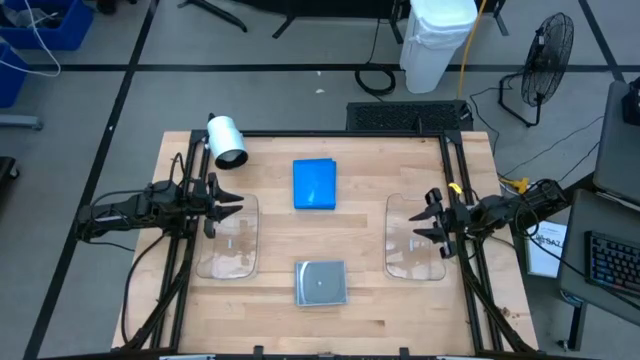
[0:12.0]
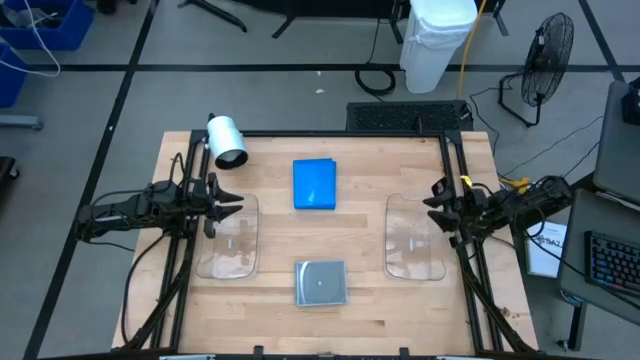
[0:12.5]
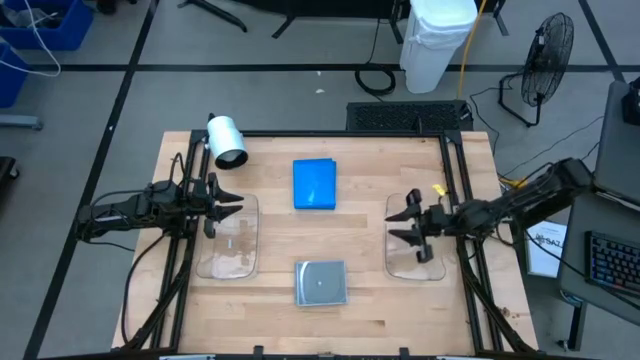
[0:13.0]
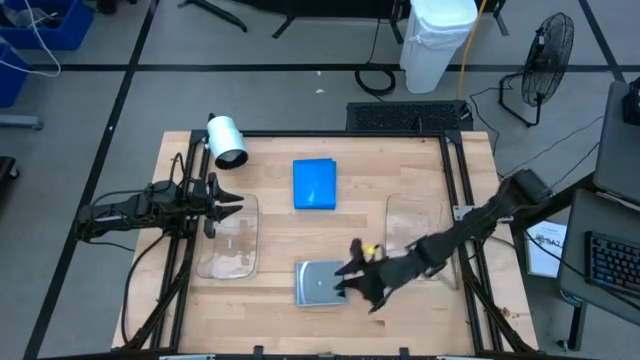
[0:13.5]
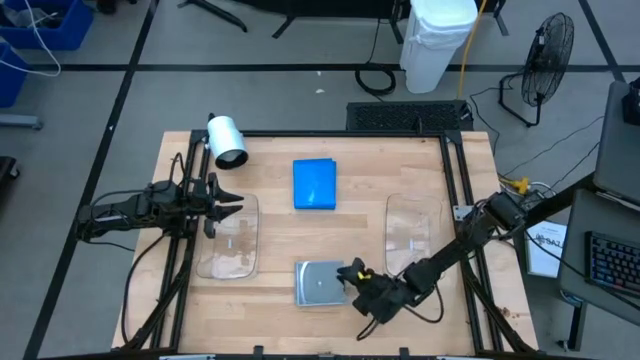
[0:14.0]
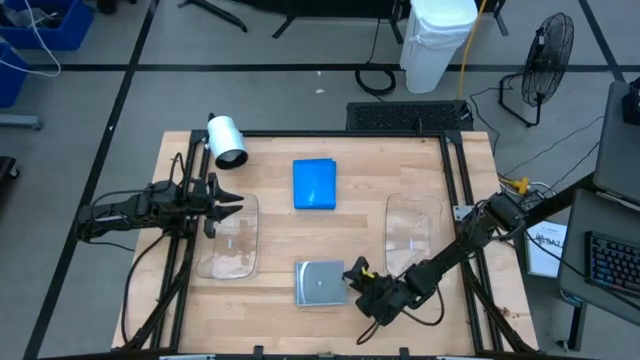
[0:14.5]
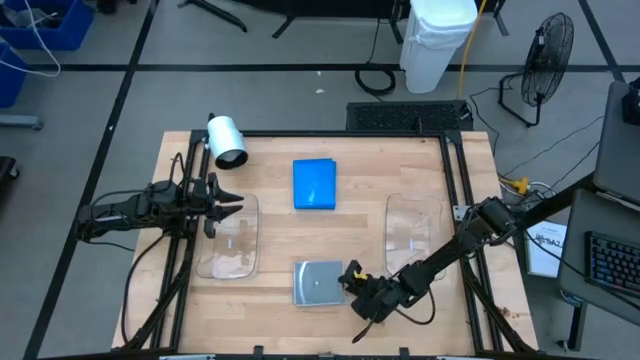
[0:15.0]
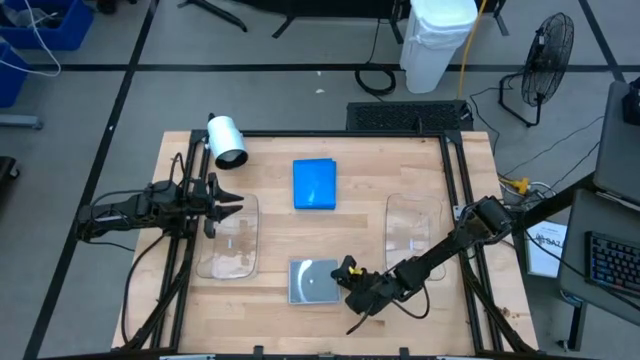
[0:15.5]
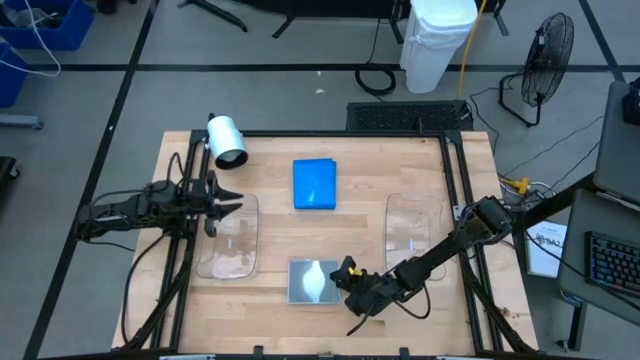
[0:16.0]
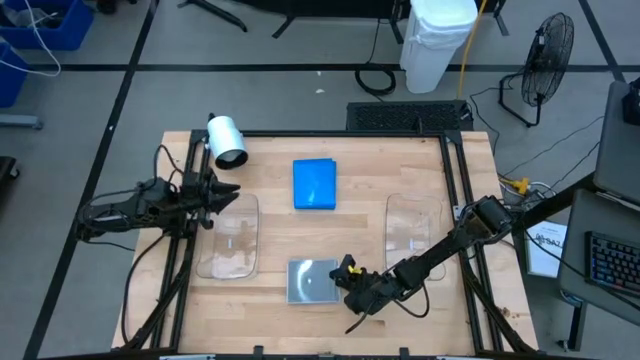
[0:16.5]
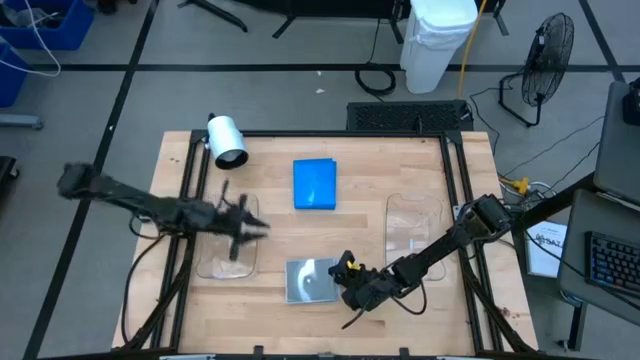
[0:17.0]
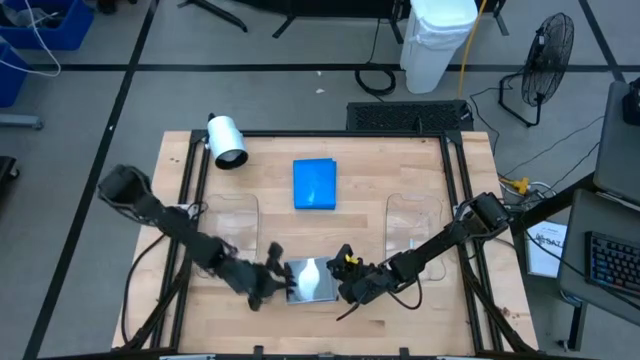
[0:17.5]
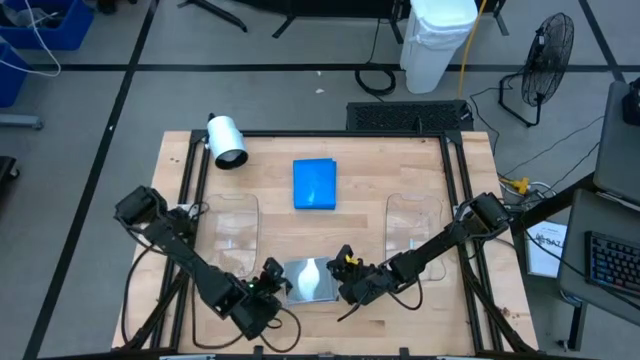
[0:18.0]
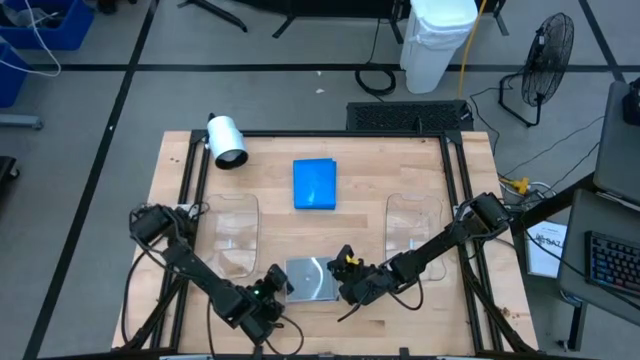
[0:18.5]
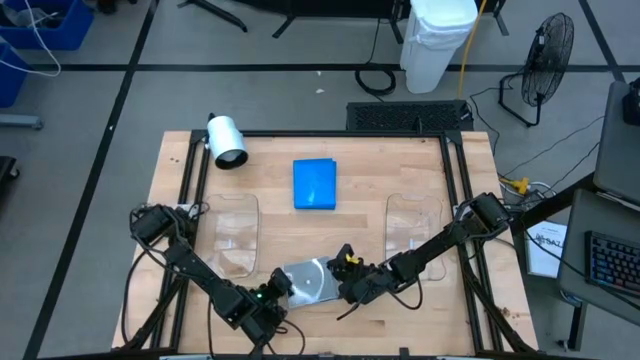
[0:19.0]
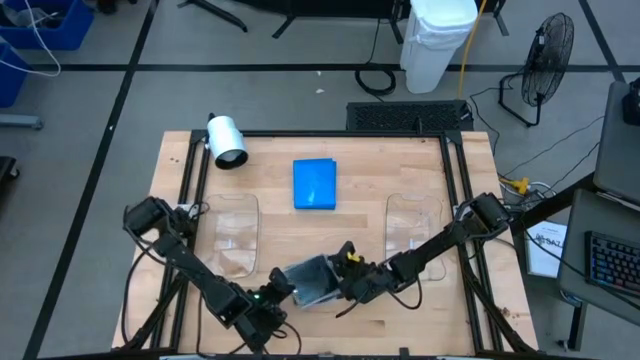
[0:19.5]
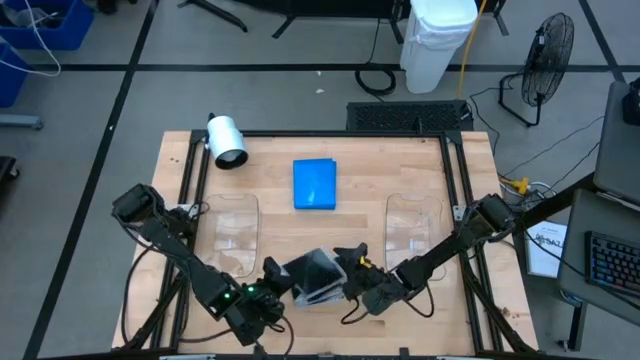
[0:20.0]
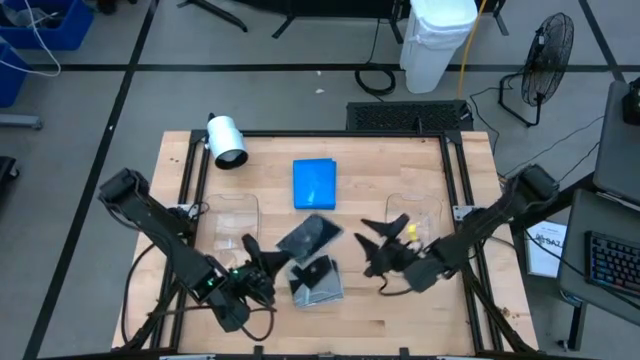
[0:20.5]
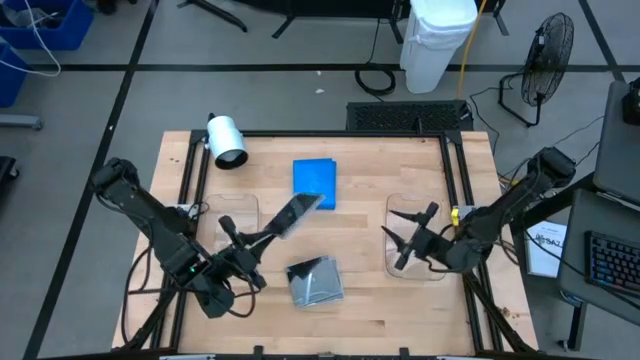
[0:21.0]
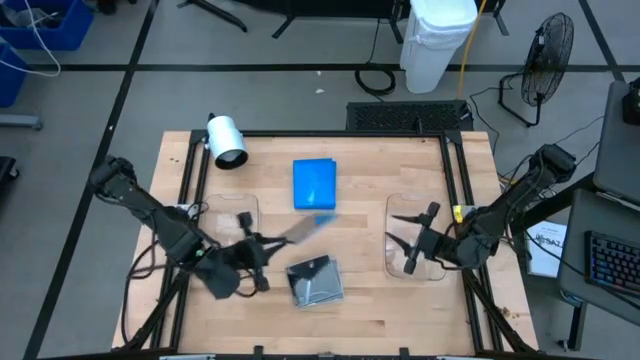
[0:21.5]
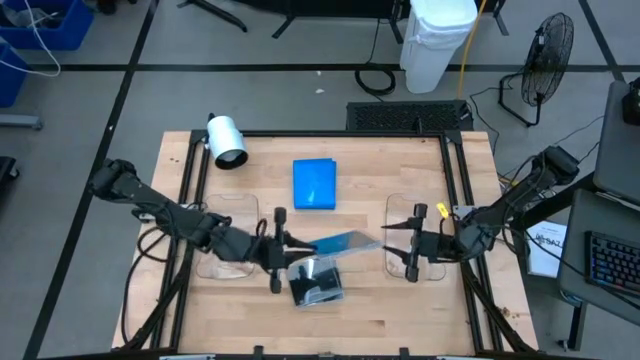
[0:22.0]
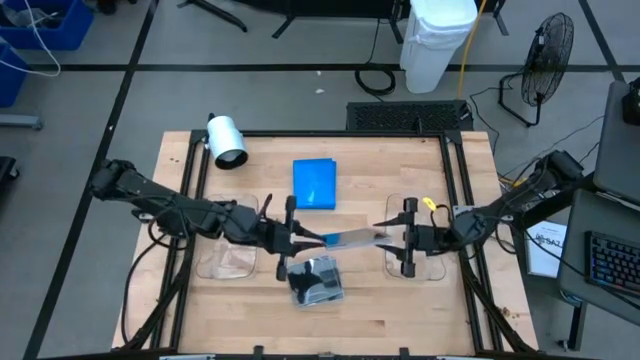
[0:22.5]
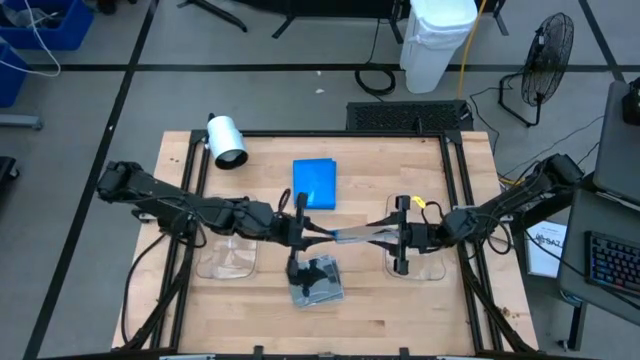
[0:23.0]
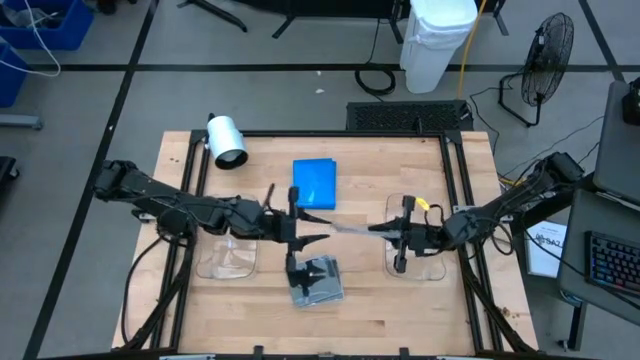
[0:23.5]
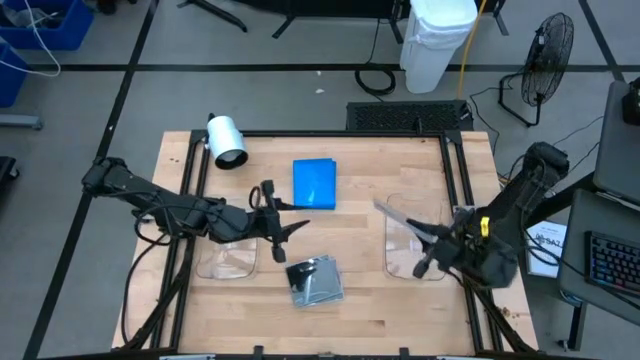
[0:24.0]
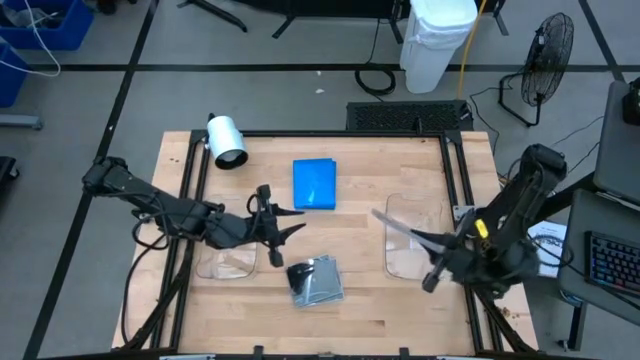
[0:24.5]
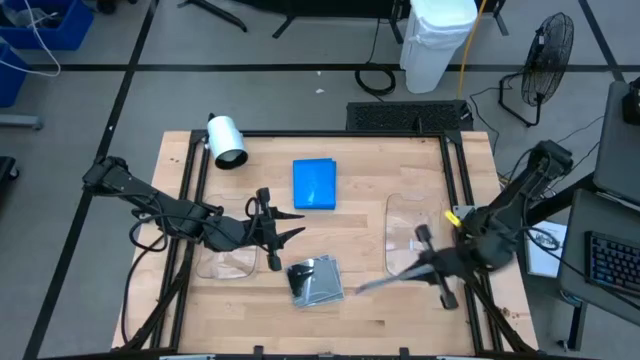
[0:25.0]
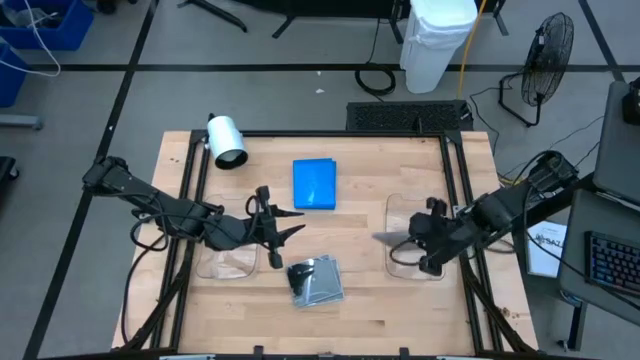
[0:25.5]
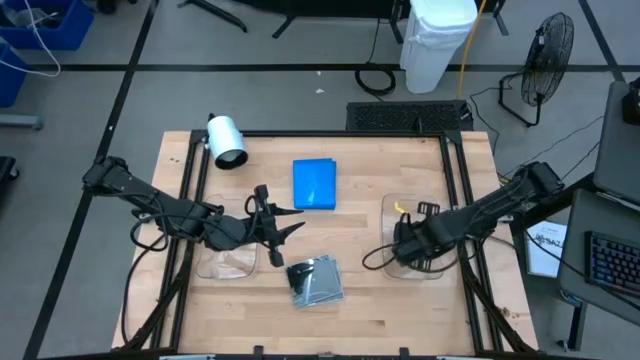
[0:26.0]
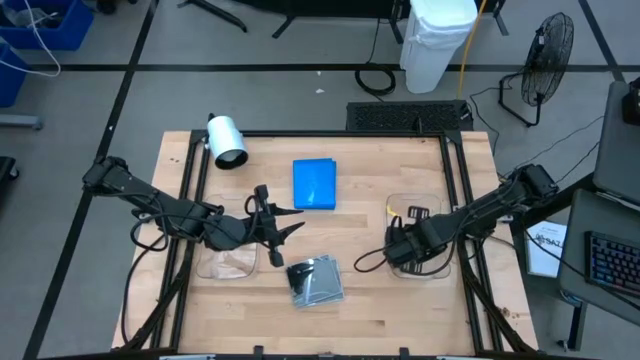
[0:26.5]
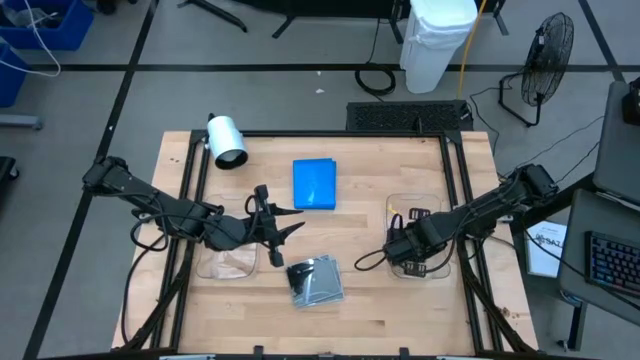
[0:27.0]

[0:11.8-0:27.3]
Task: Pick & place jewel cases by type
Put the black CD case into the right transparent bin

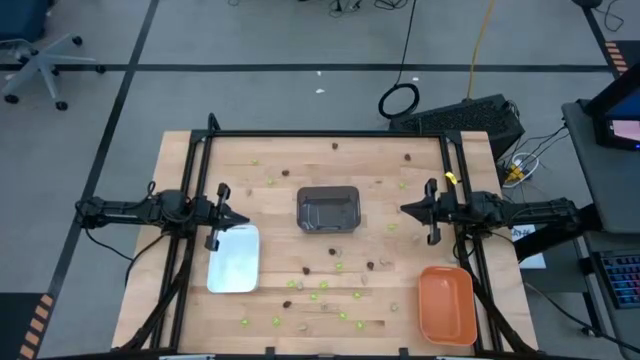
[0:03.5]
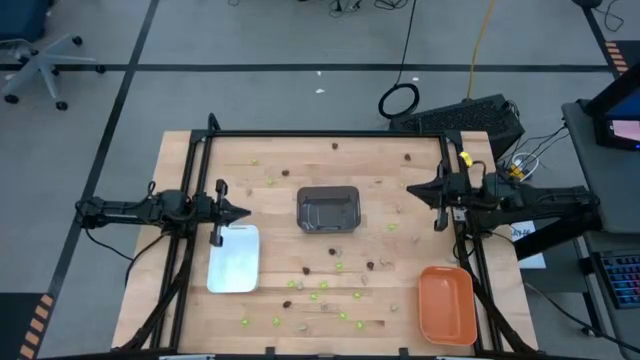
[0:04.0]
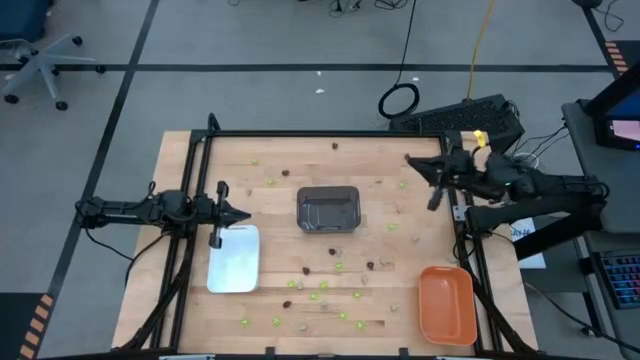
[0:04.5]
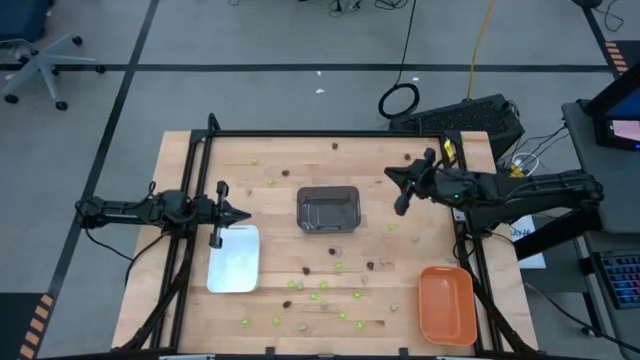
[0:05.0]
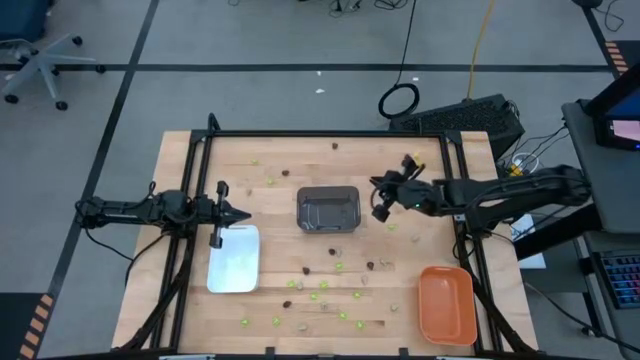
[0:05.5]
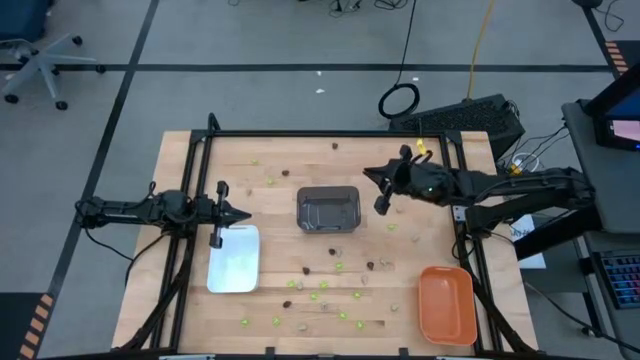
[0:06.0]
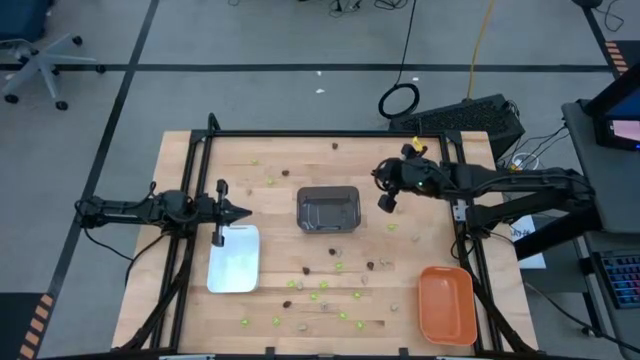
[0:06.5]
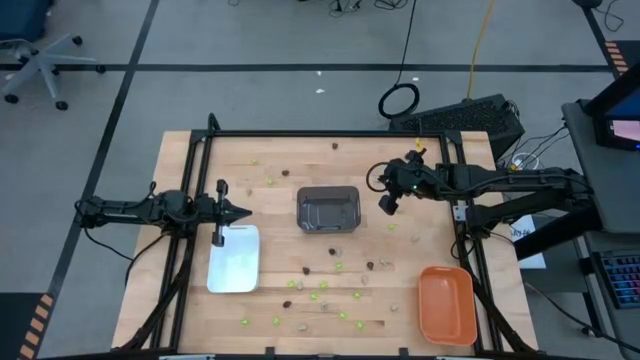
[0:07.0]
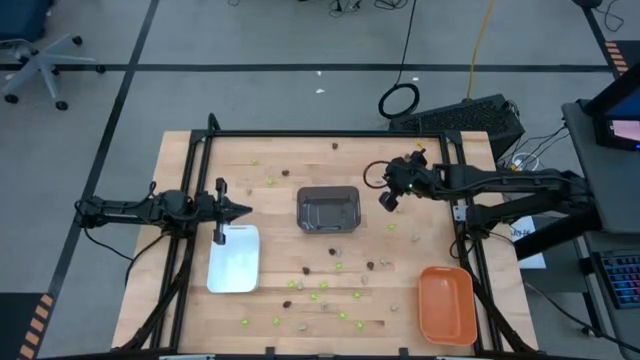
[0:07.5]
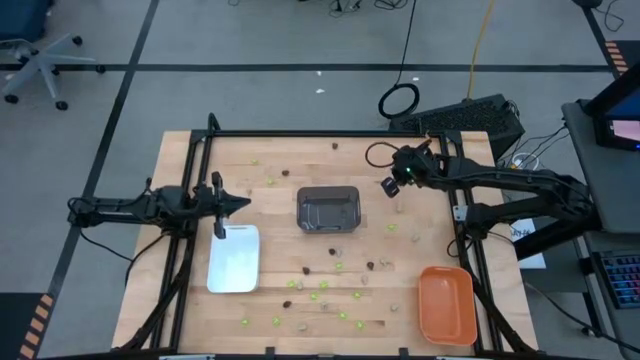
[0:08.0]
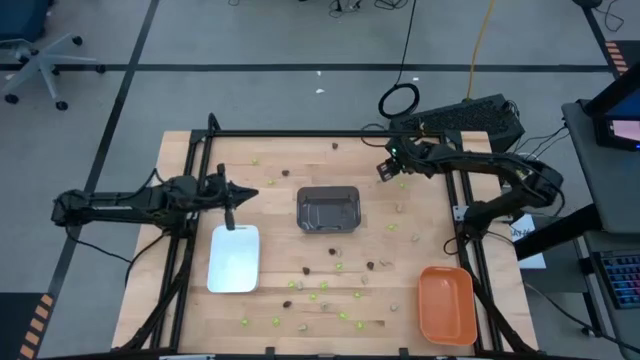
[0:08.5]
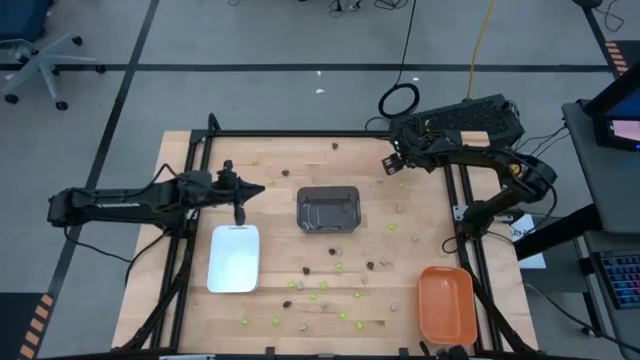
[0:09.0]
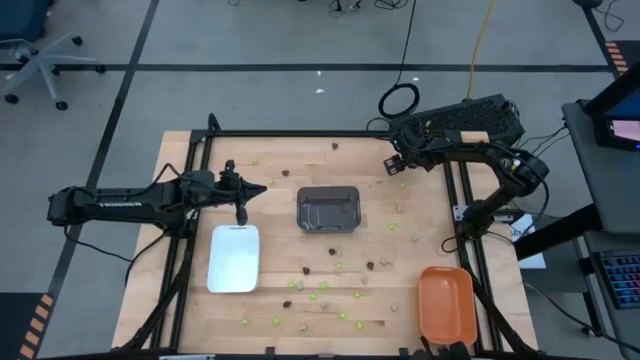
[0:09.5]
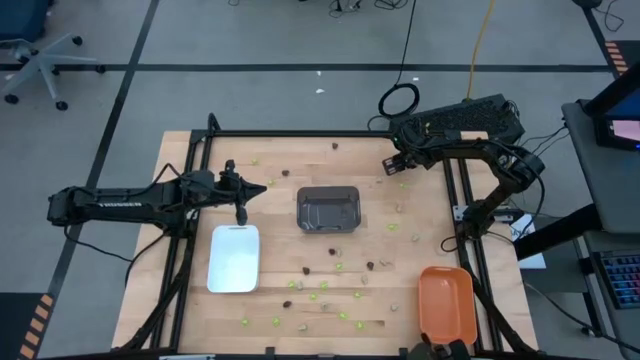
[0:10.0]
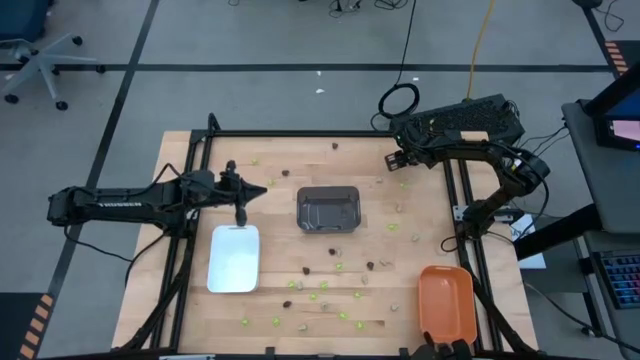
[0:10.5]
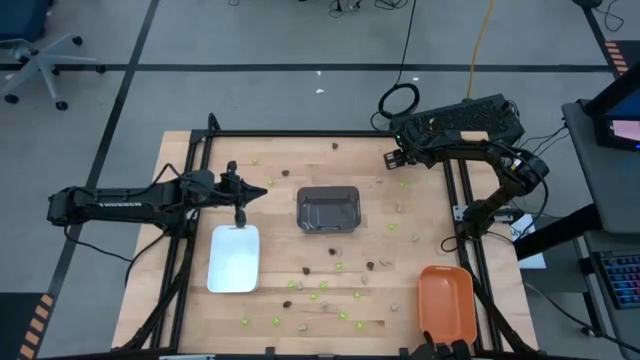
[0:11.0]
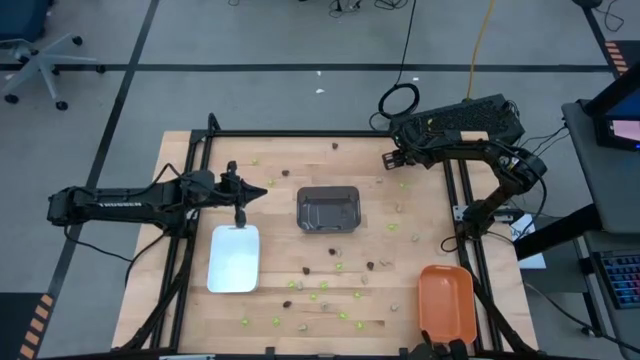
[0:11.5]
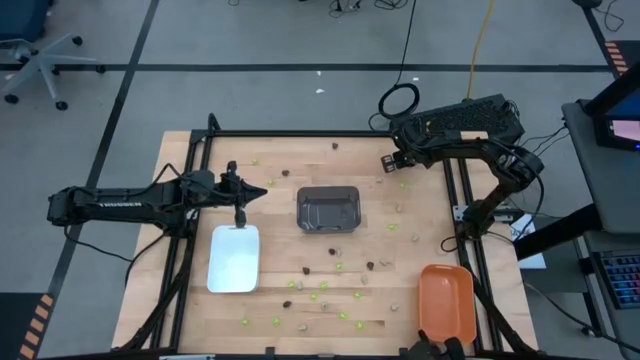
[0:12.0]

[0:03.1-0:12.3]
Task: Sort Halloween decoration
Put the black skull toy into the black bin
